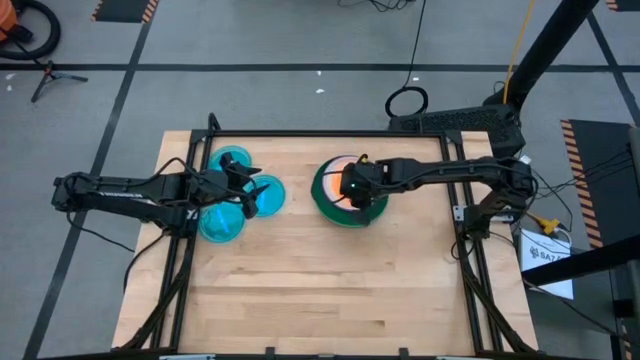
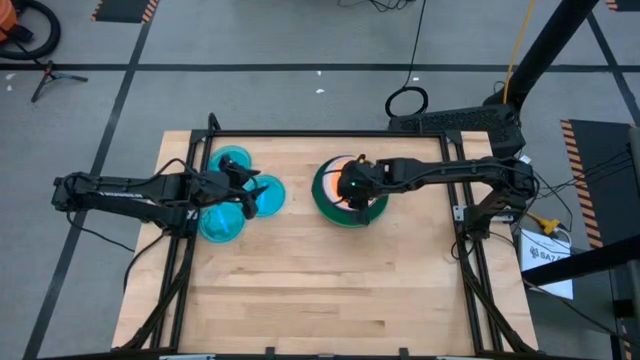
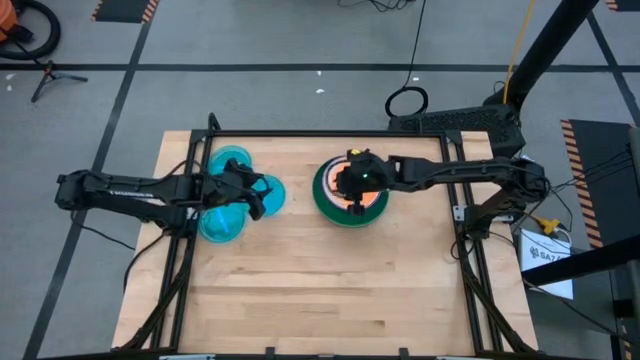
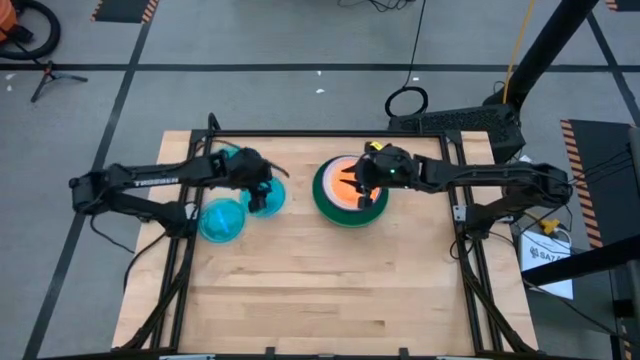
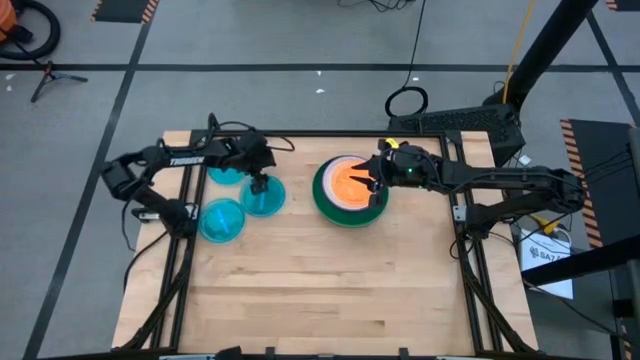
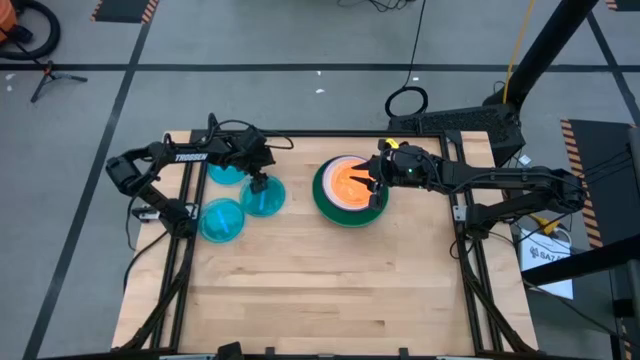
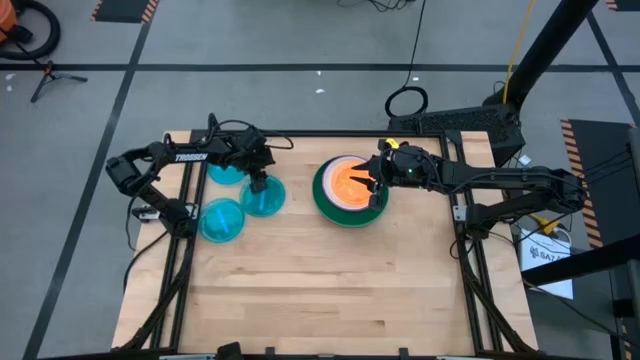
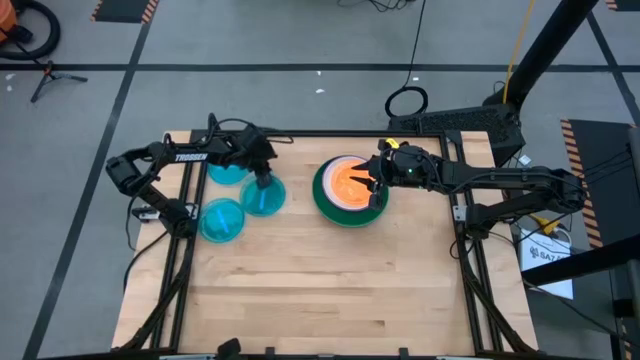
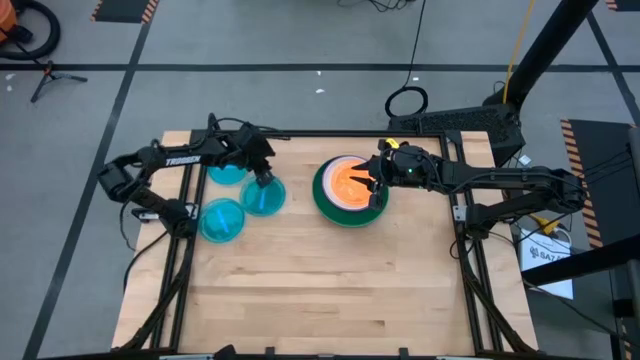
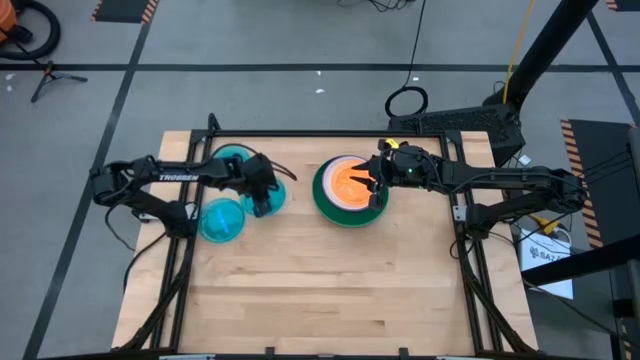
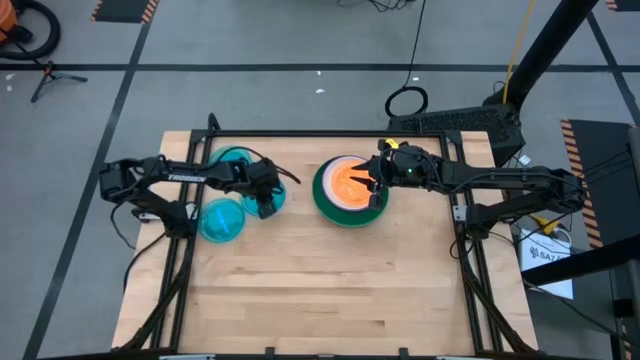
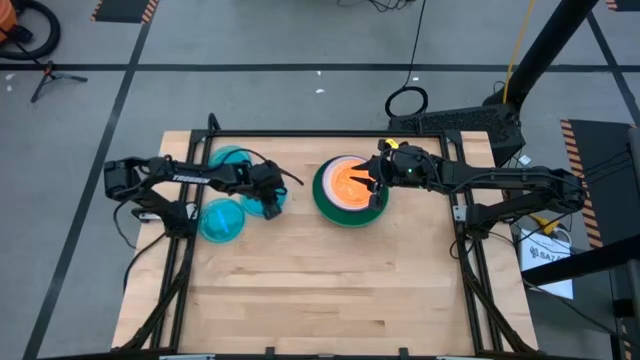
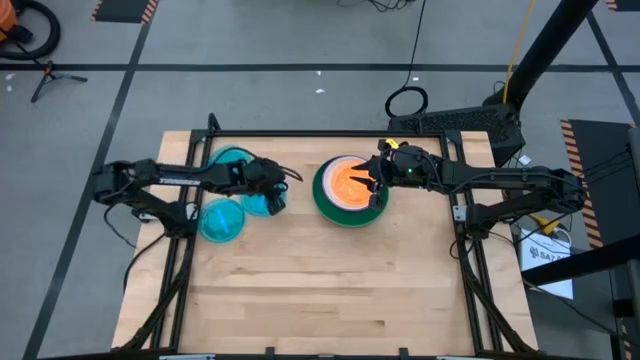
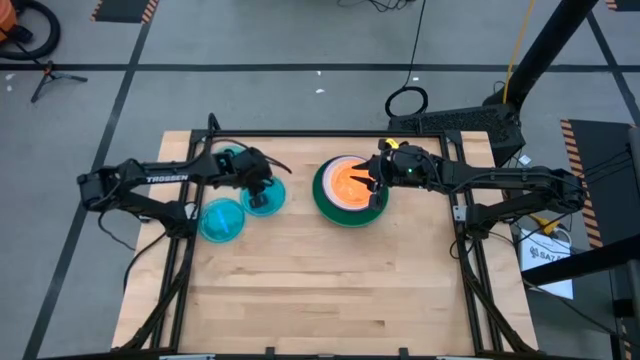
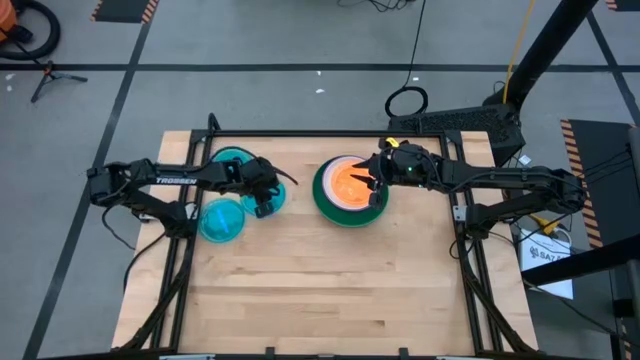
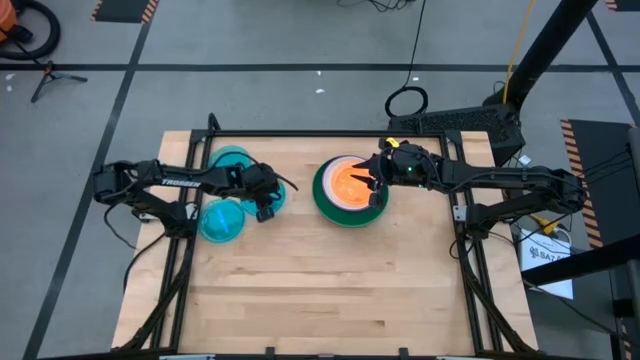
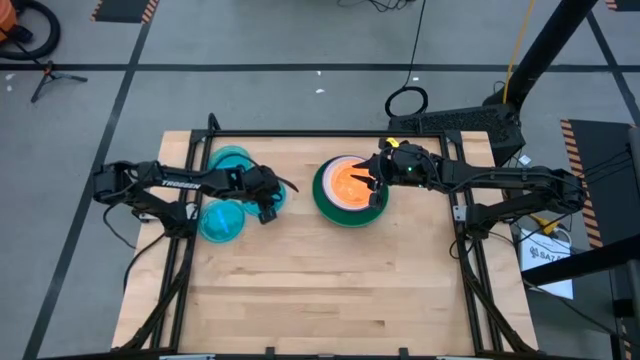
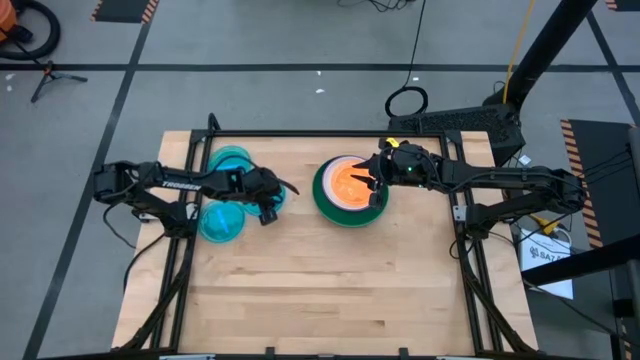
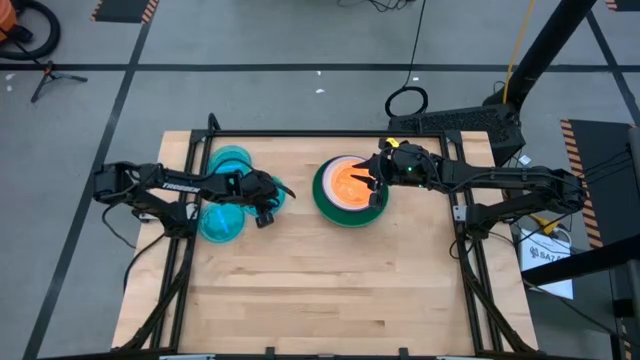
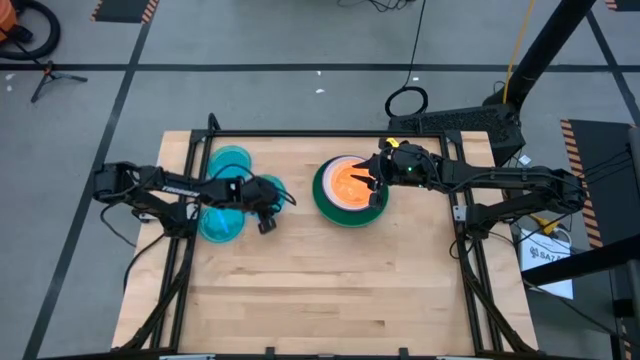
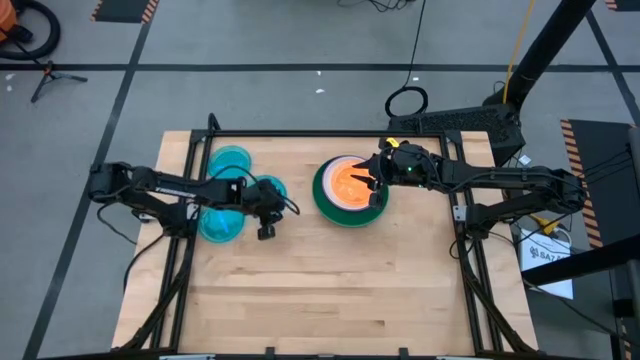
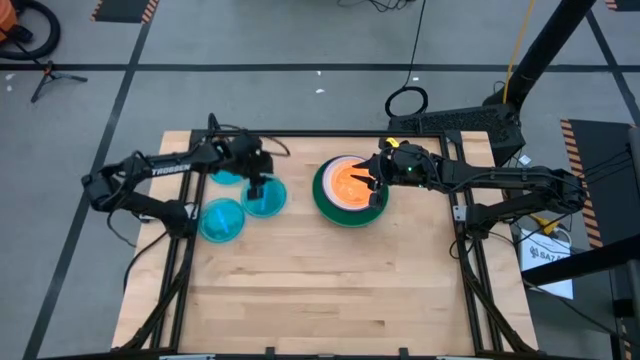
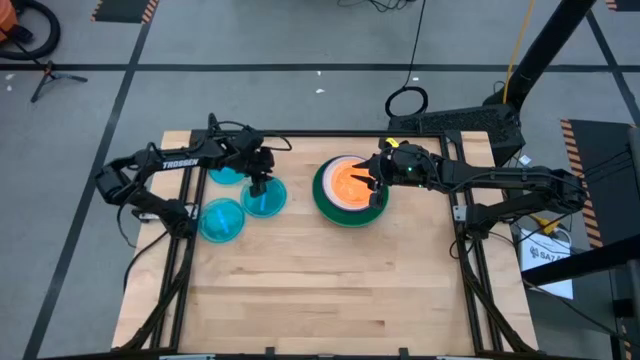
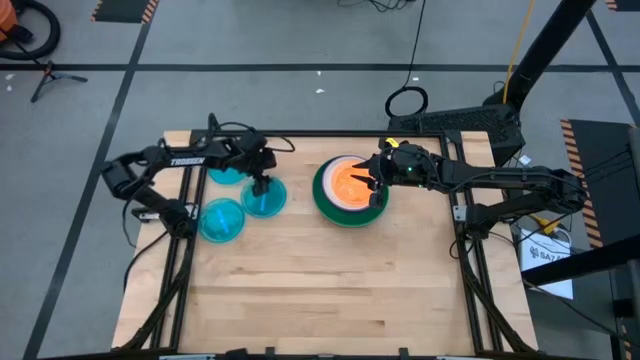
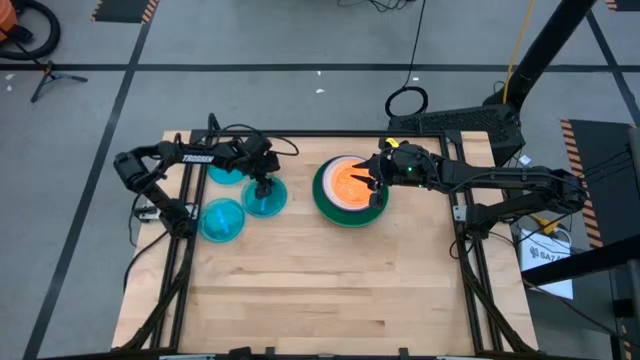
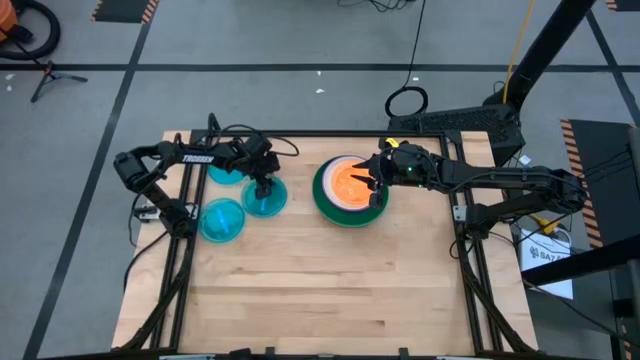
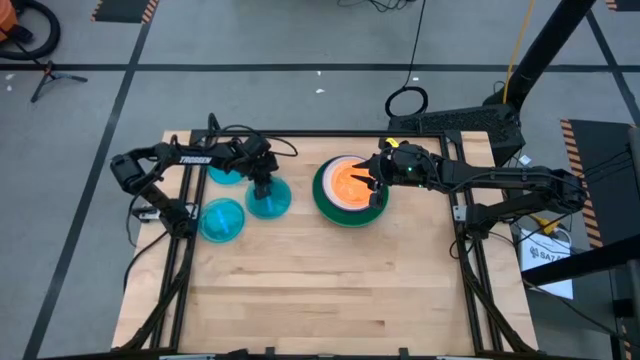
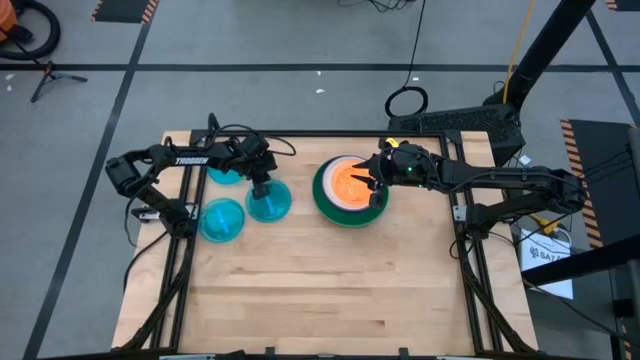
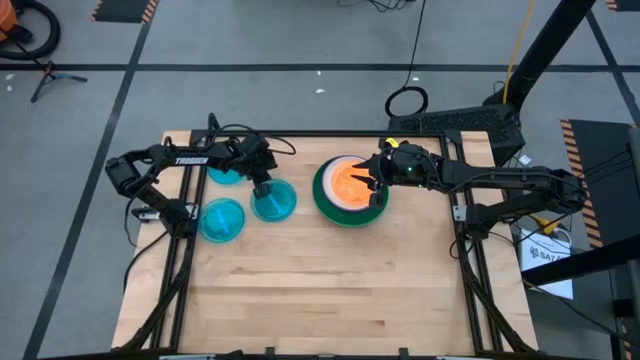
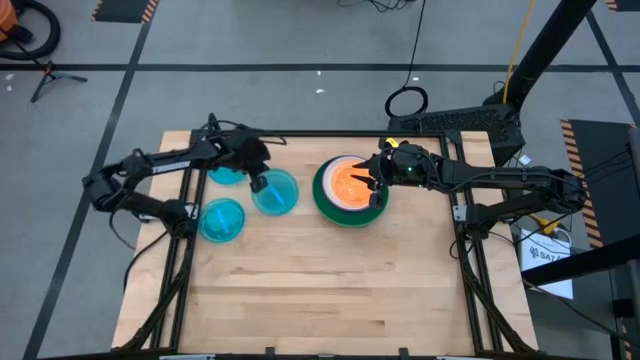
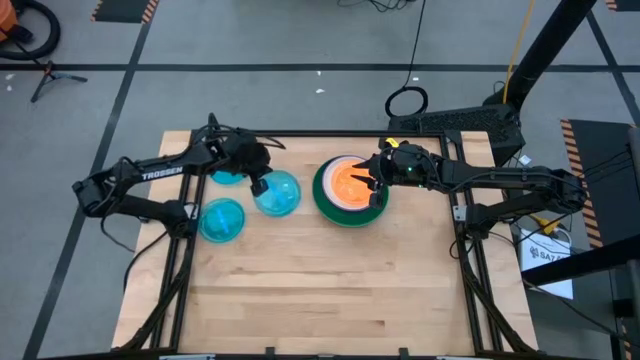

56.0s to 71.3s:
Task: Stack plastic plates
Stack the middle right blue plate on the orange plate

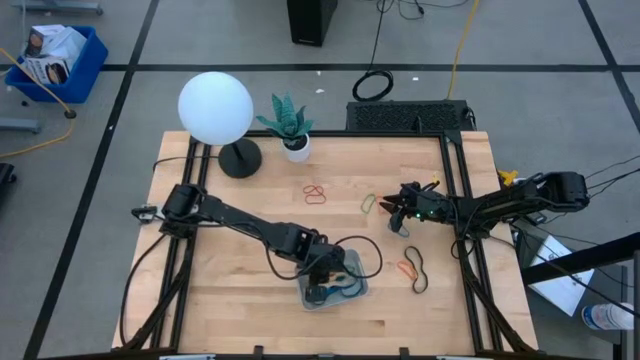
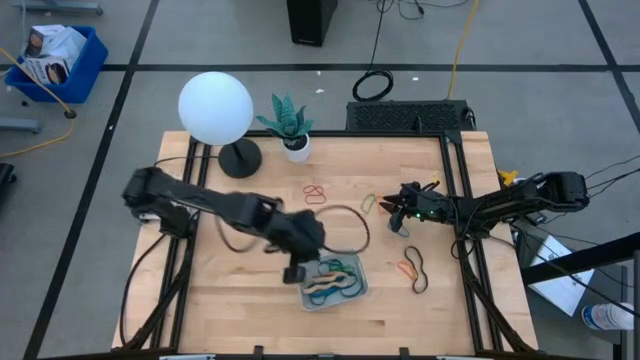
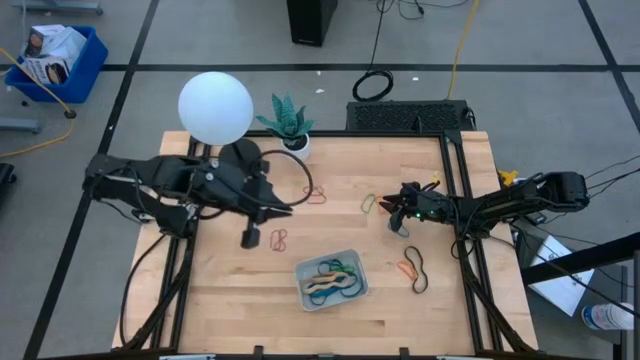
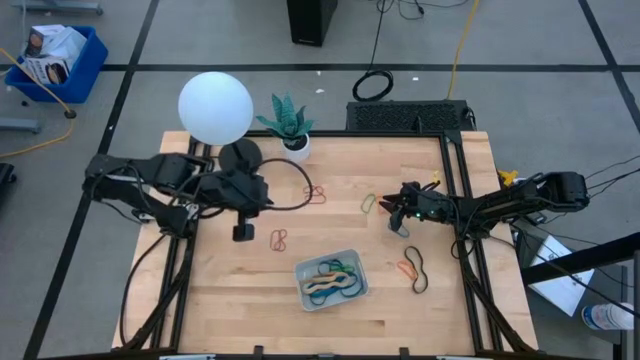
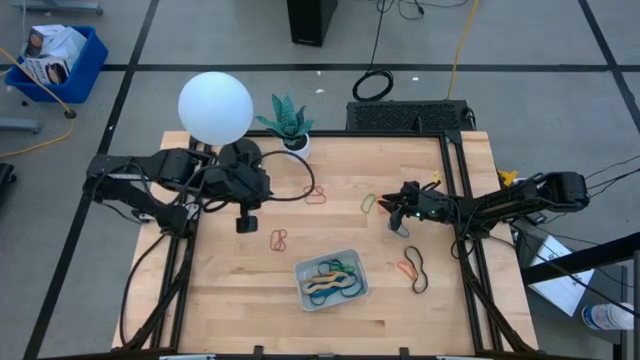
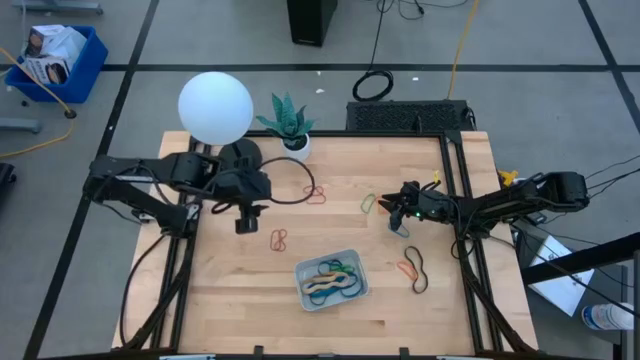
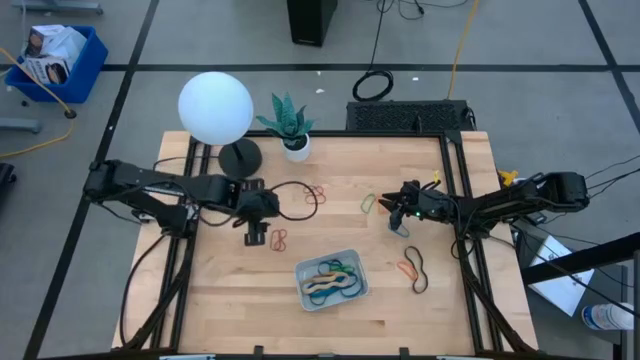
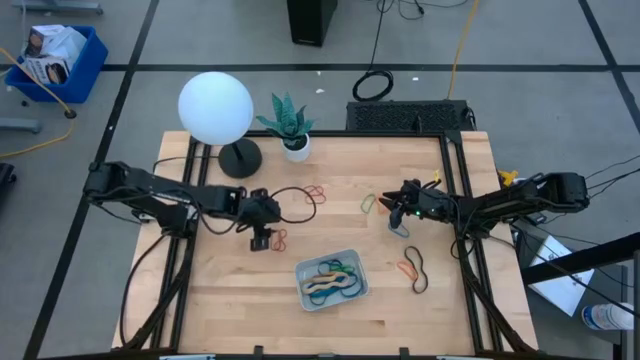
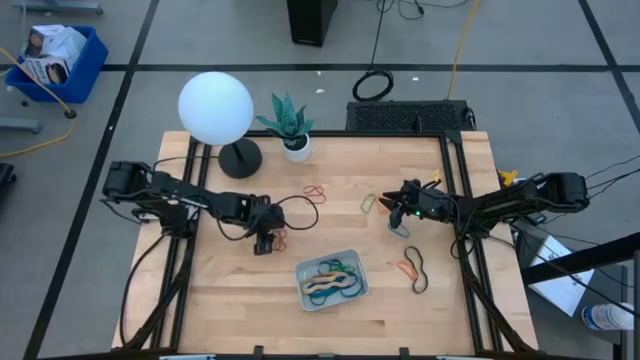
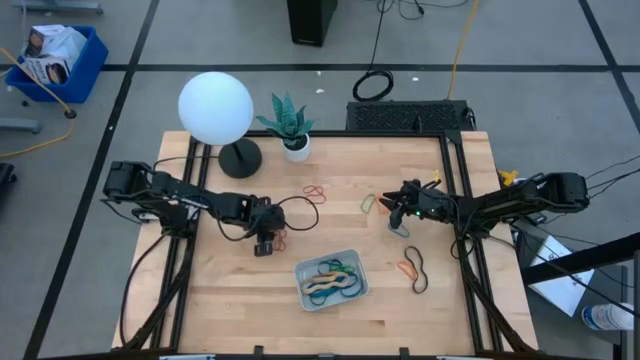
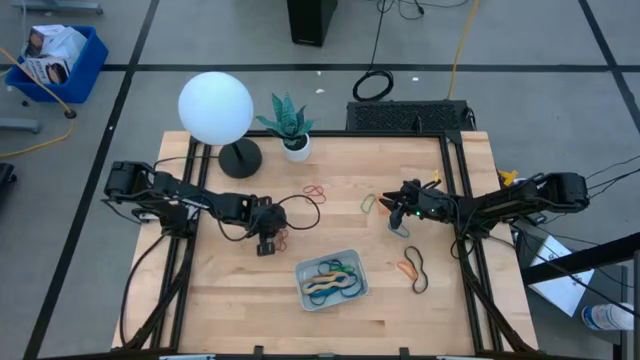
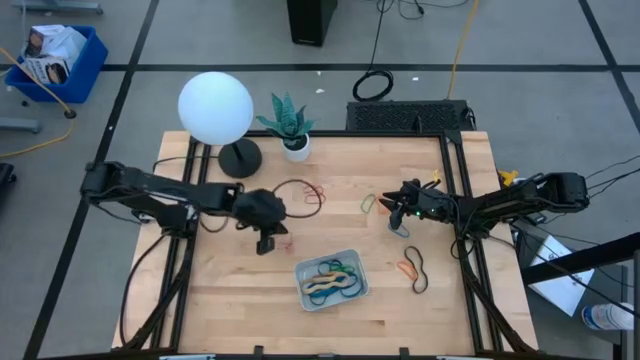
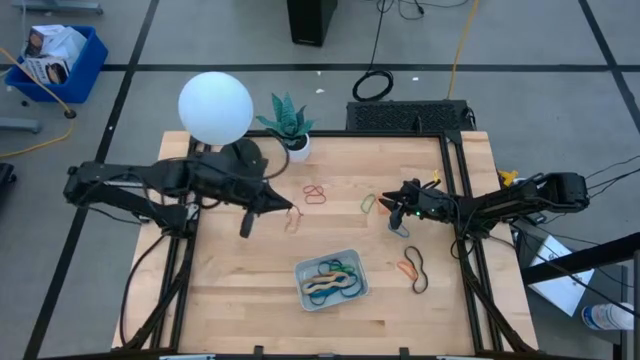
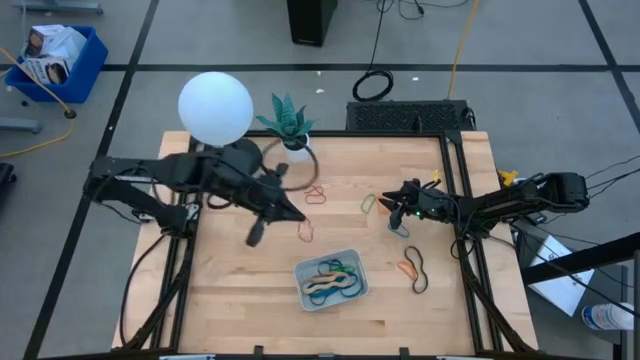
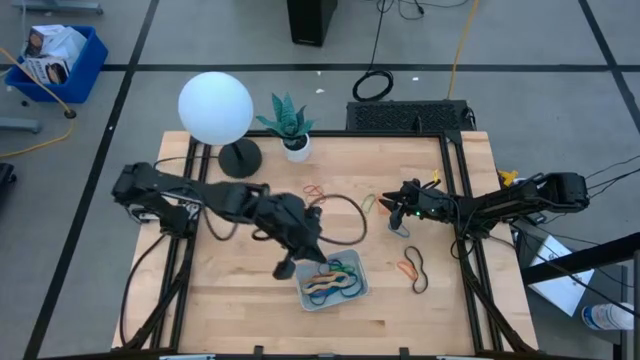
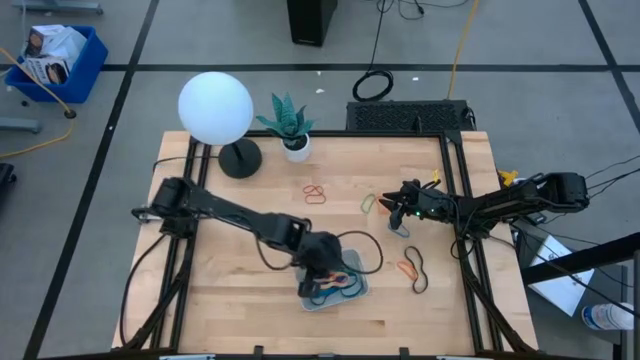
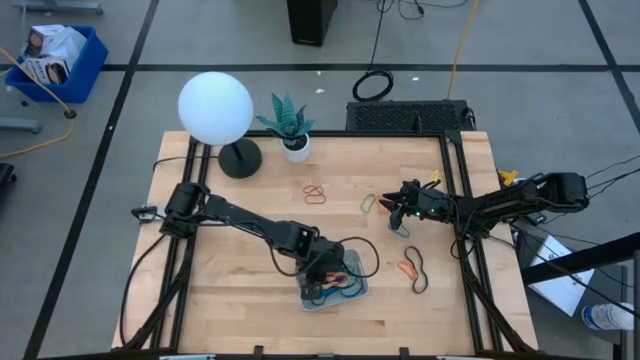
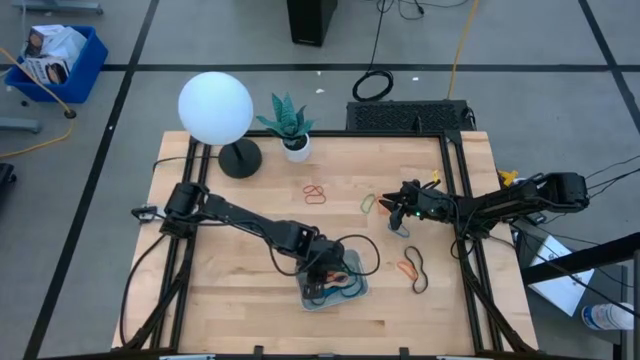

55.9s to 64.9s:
Task: Pick and place rubber bands into bin
Put the bottom red rubber band into the gray bin
